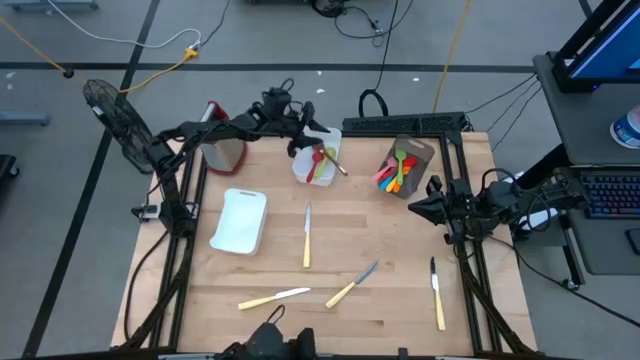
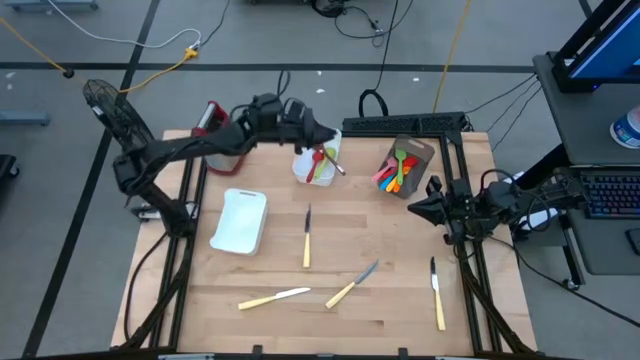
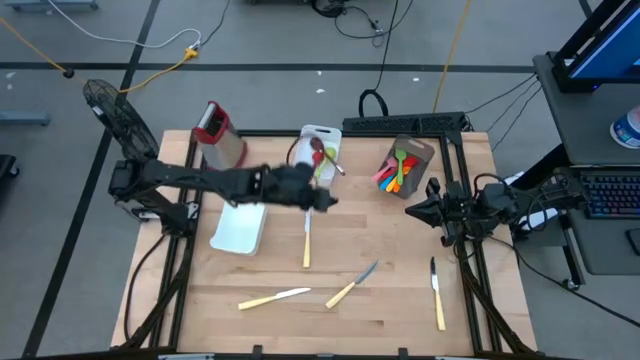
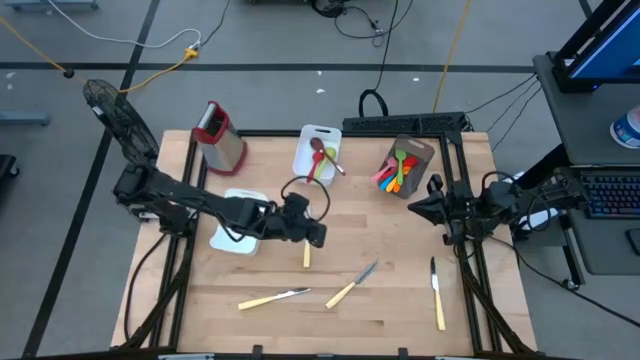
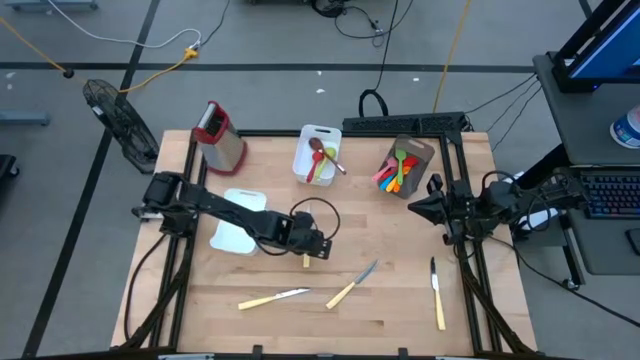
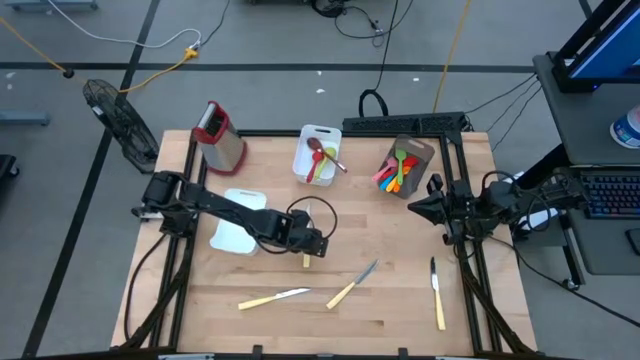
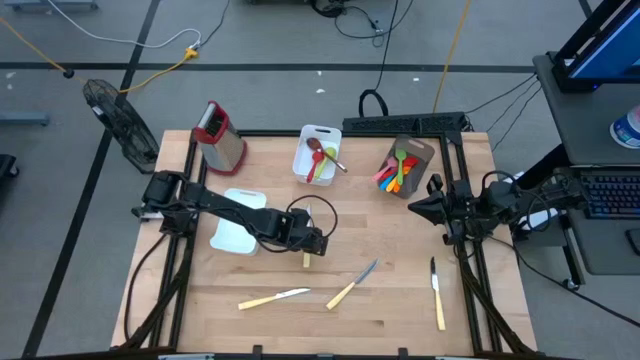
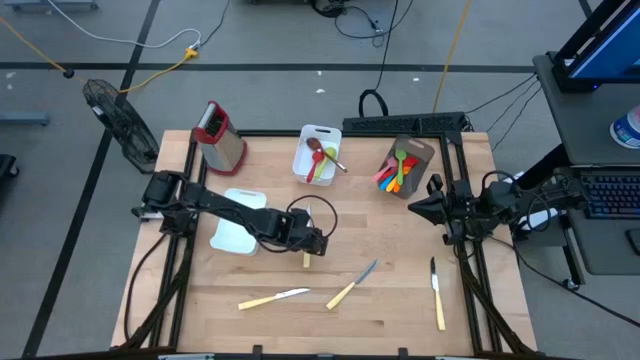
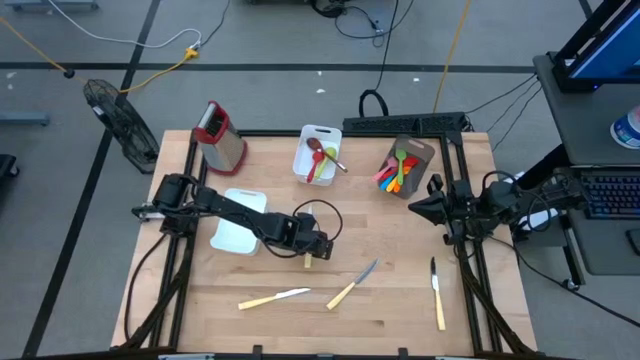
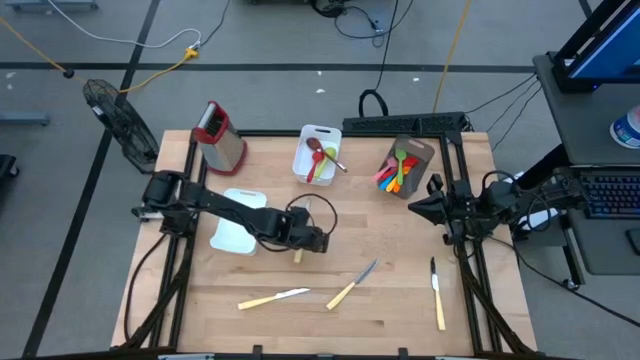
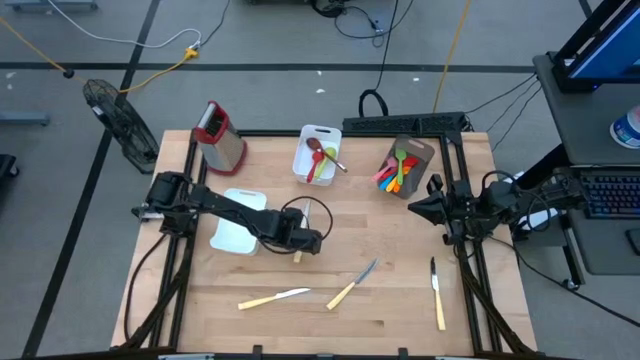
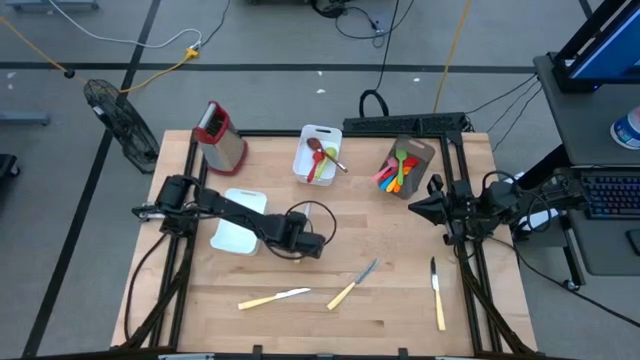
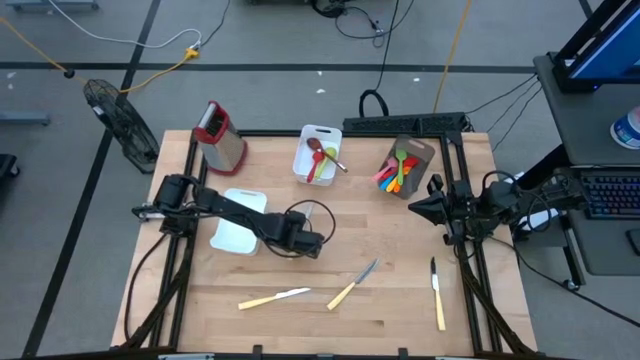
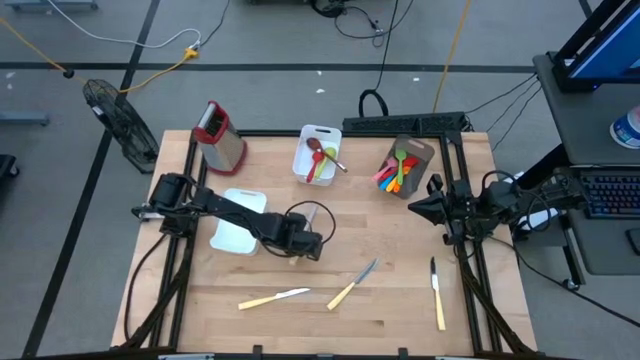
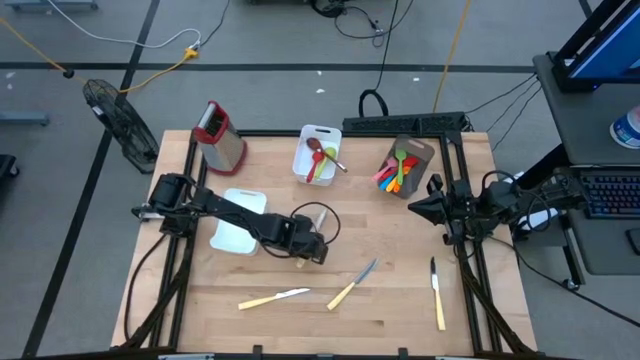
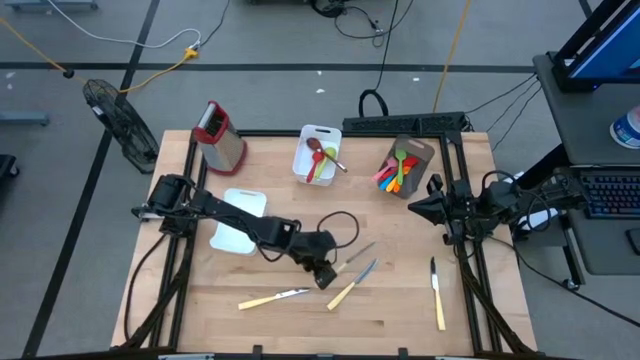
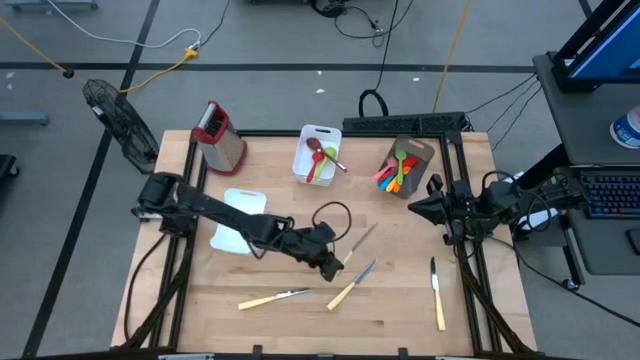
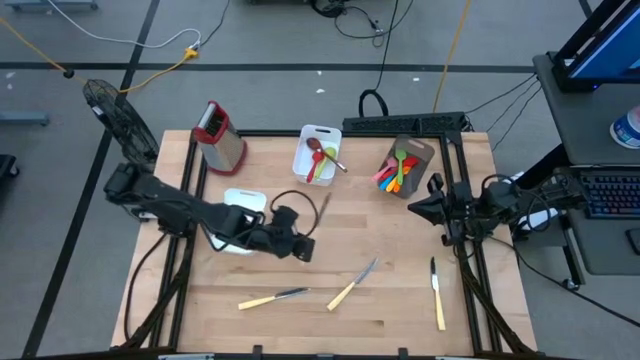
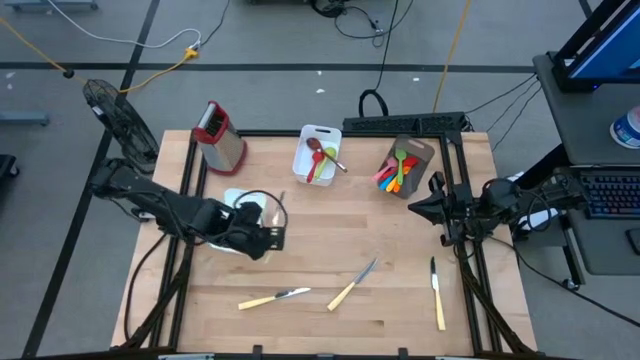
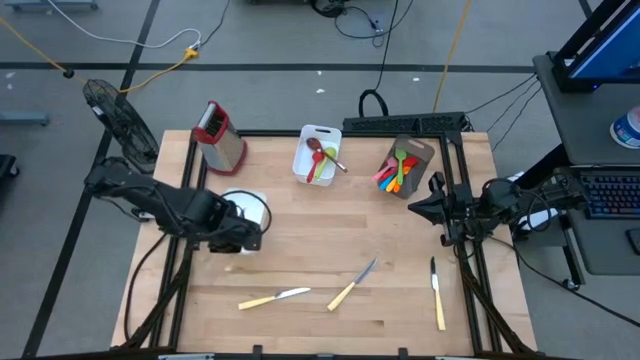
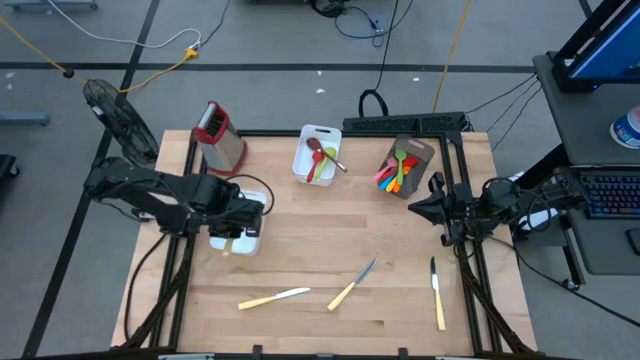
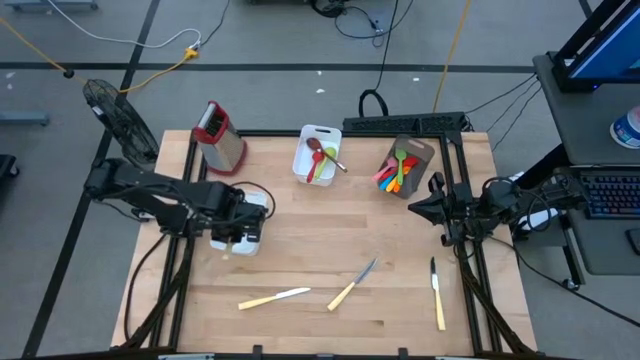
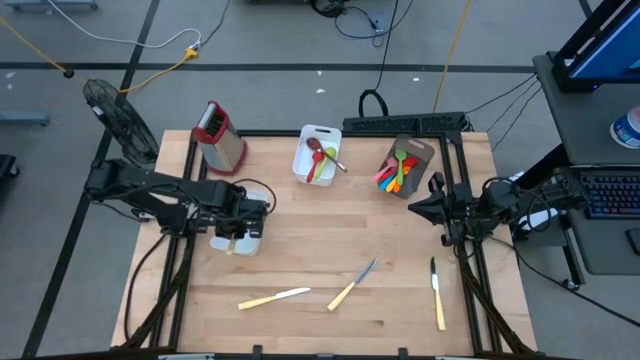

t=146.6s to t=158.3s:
Task: Pick & Place Kitchen Items
Put the yellow knife into the bottom white bin

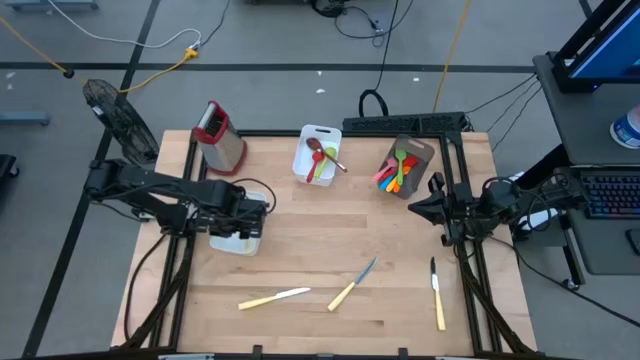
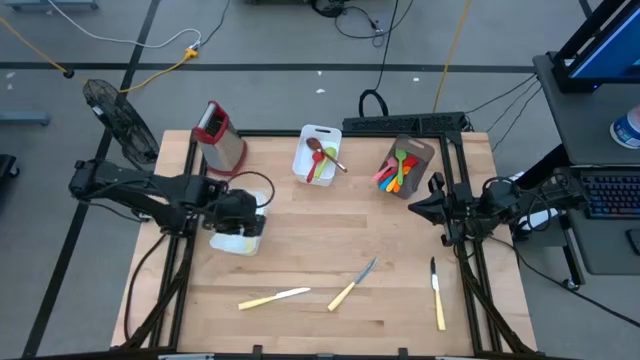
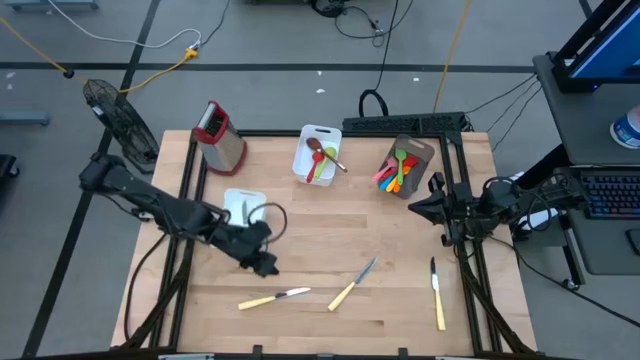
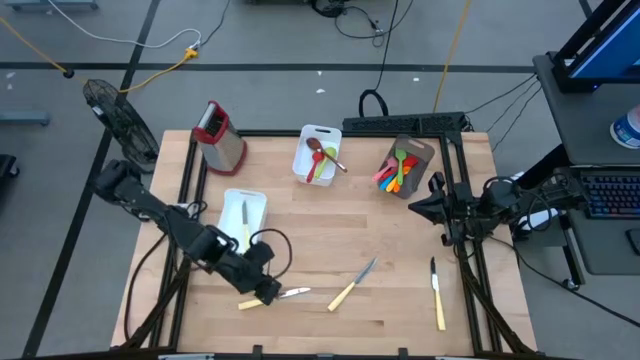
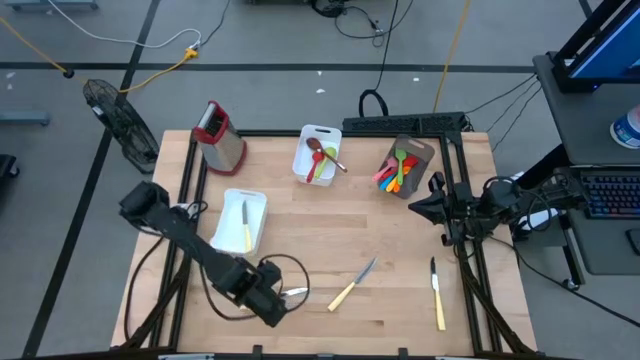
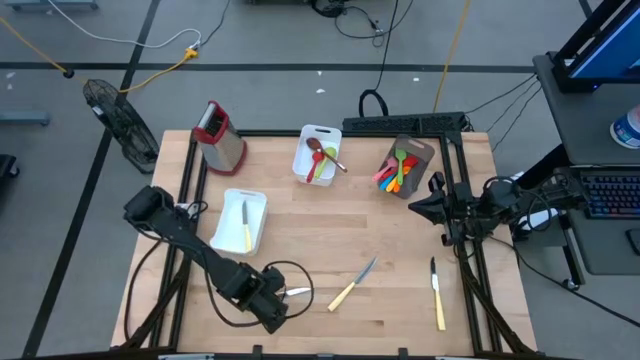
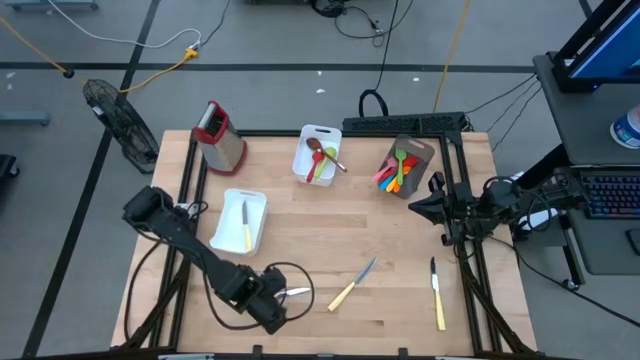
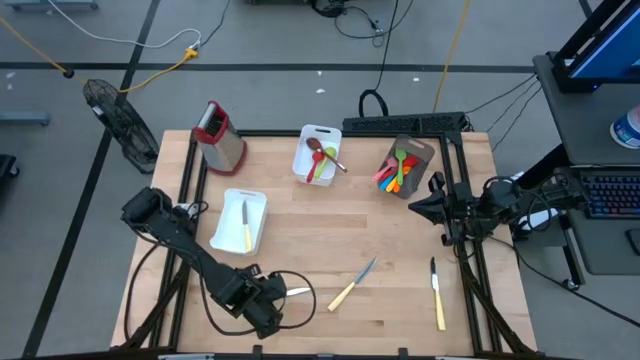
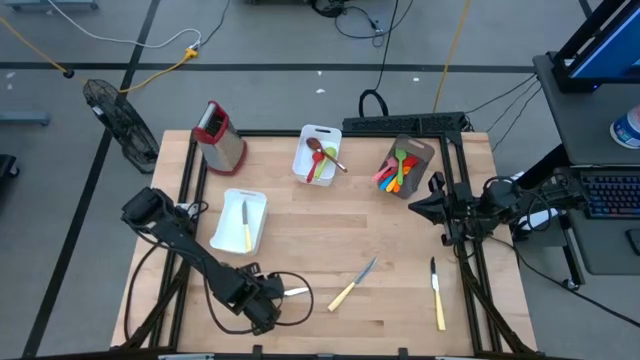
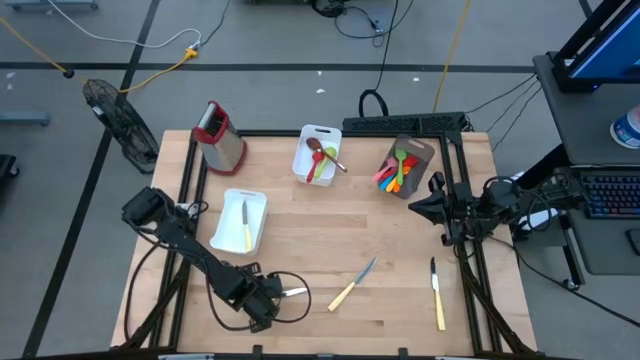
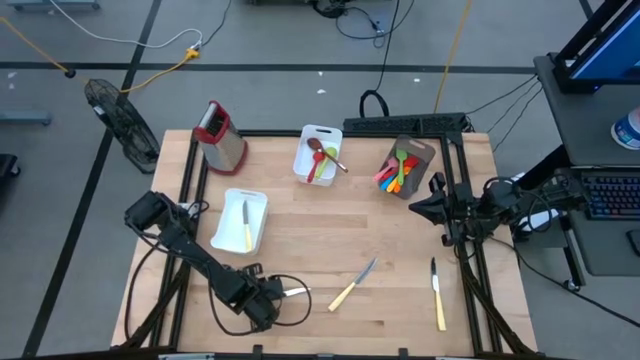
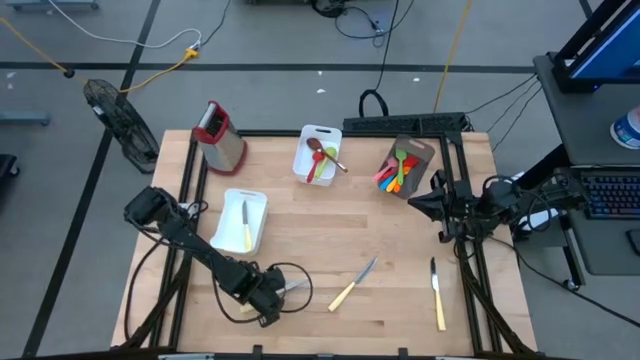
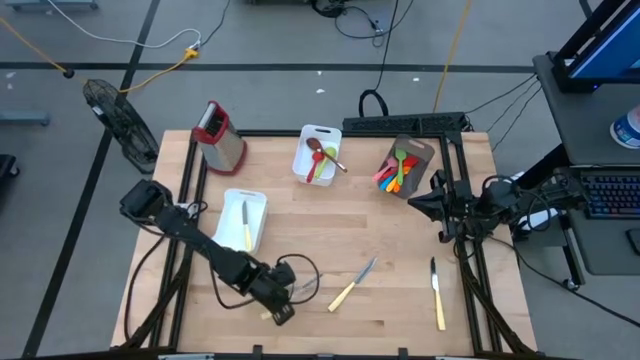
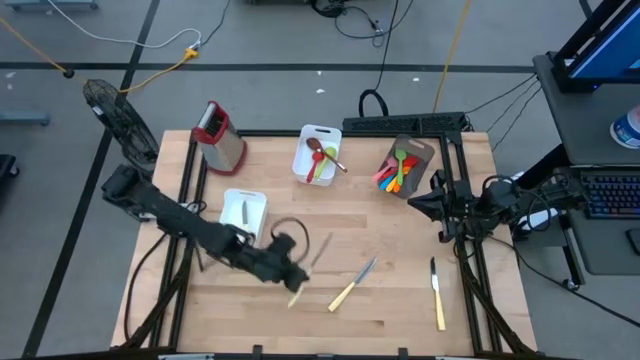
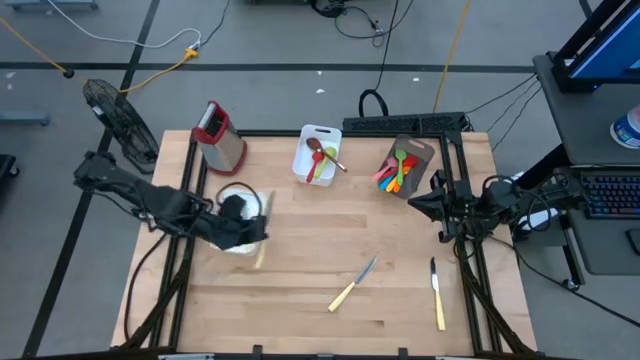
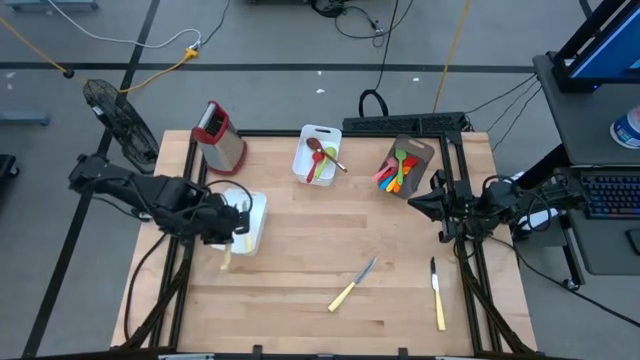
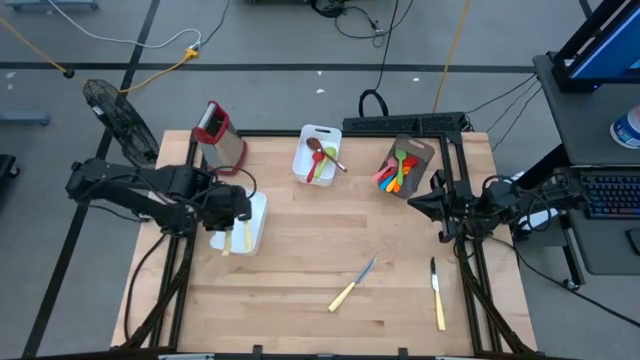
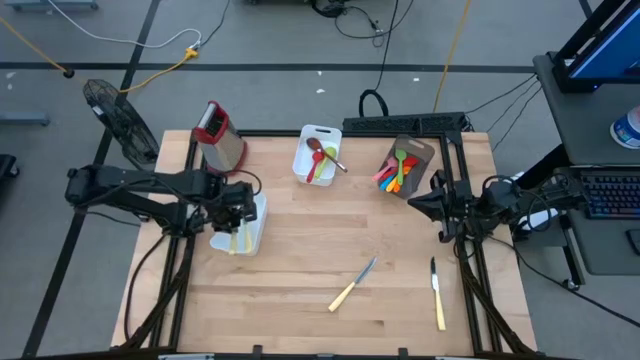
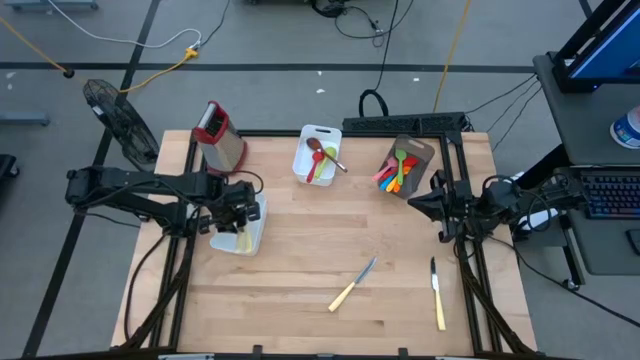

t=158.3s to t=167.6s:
Put the yellow knife into the bottom white bin

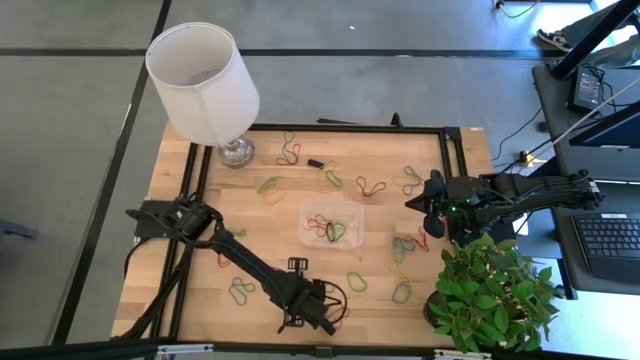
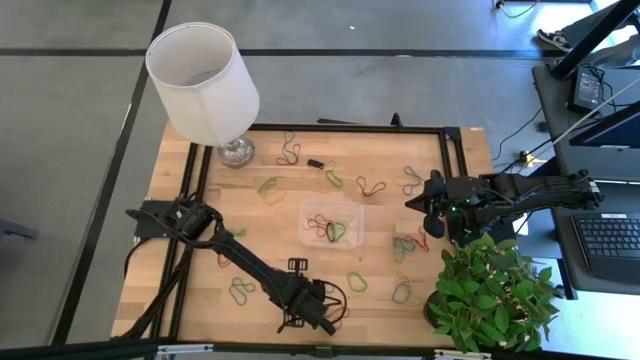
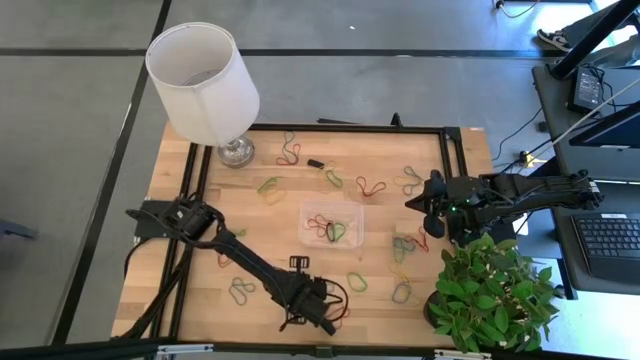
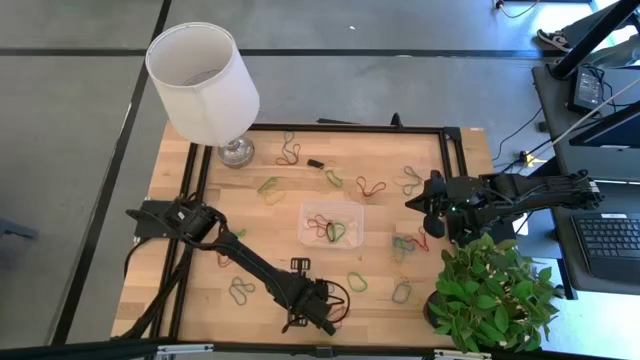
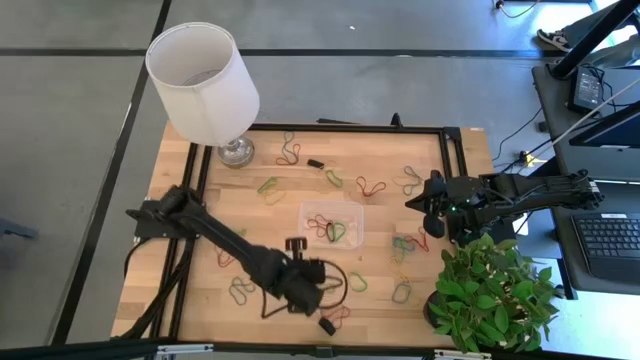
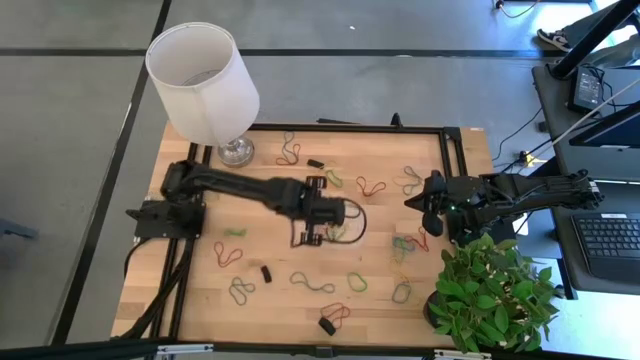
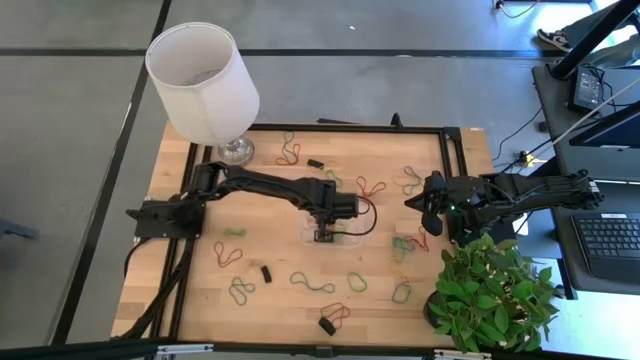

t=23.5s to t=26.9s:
Task: Pick and place rubber bands into bin
Put the yellow rubber band into the transparent bin
